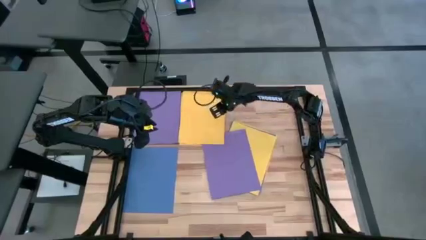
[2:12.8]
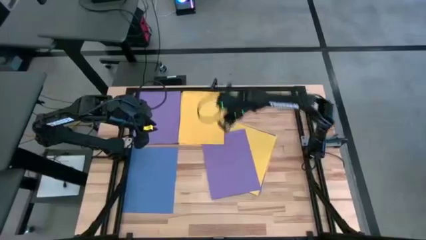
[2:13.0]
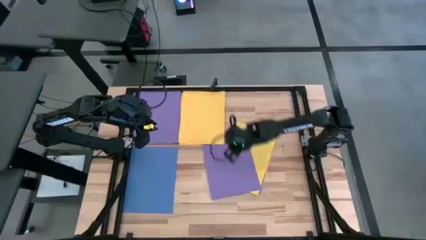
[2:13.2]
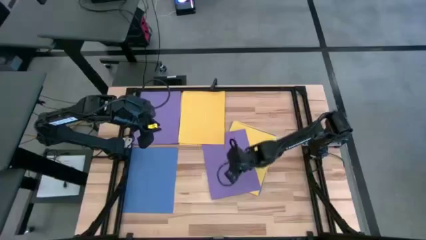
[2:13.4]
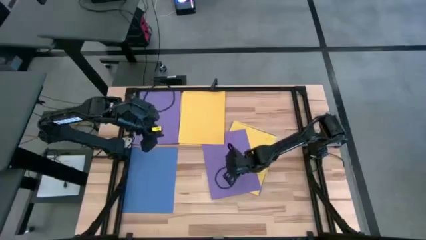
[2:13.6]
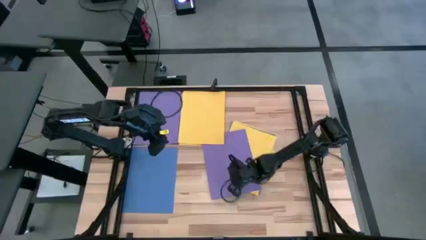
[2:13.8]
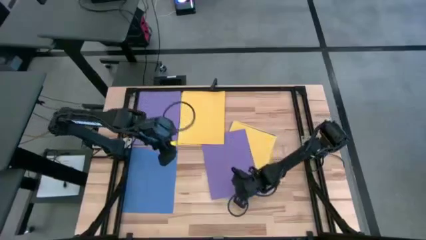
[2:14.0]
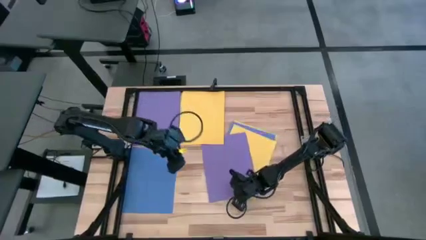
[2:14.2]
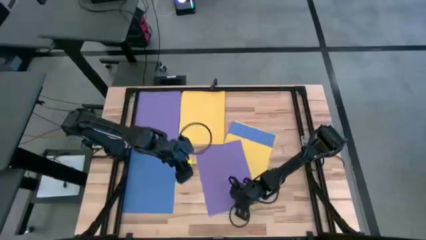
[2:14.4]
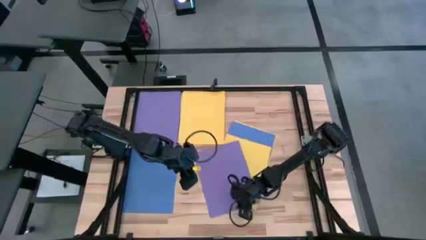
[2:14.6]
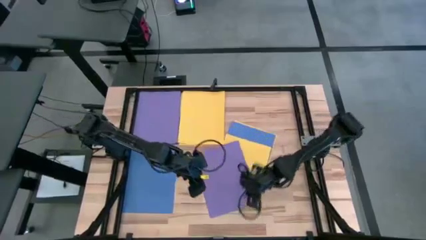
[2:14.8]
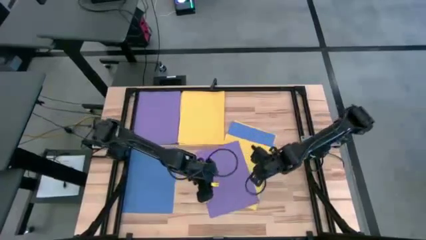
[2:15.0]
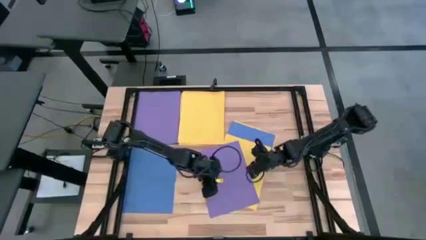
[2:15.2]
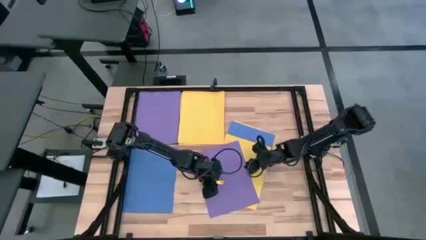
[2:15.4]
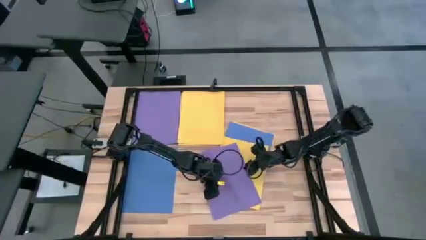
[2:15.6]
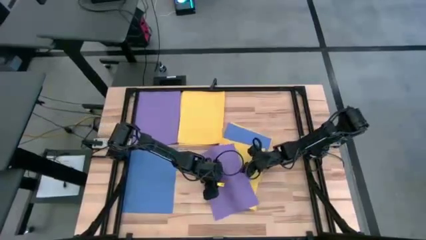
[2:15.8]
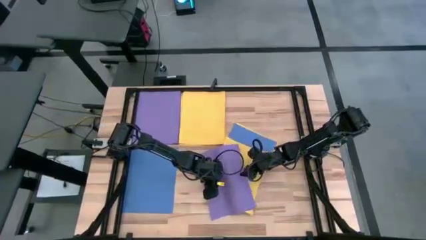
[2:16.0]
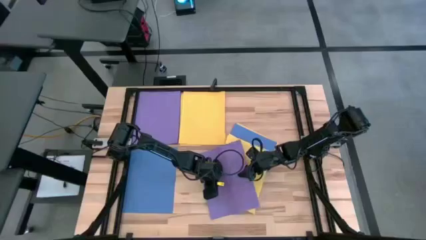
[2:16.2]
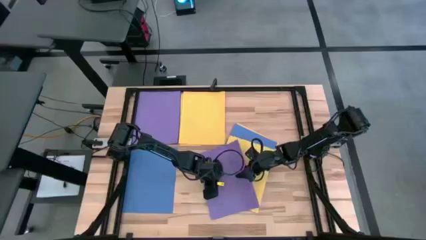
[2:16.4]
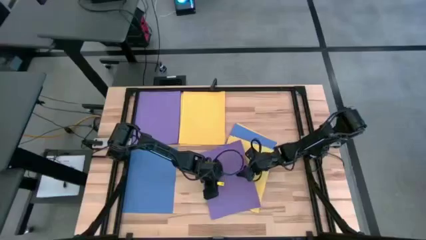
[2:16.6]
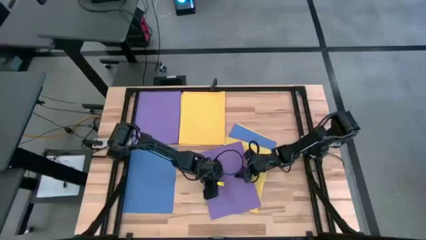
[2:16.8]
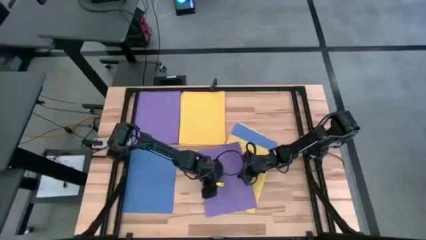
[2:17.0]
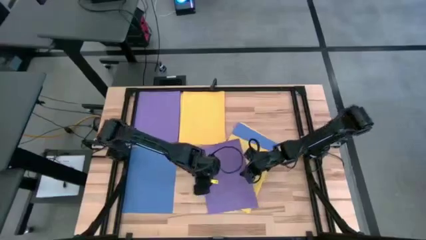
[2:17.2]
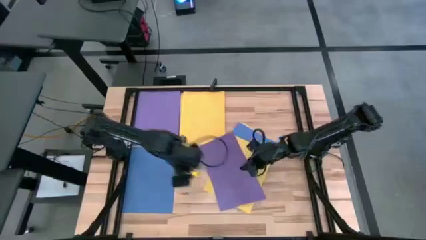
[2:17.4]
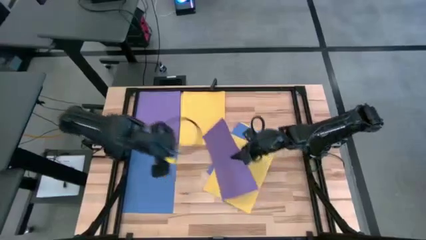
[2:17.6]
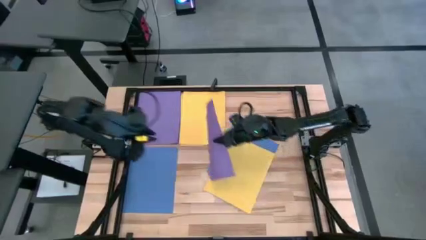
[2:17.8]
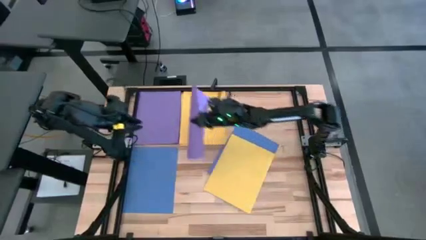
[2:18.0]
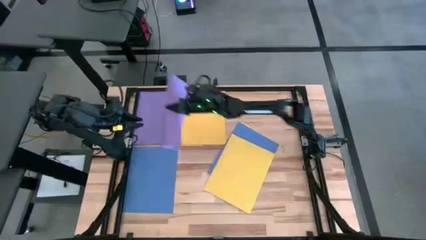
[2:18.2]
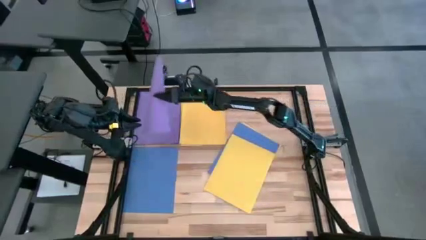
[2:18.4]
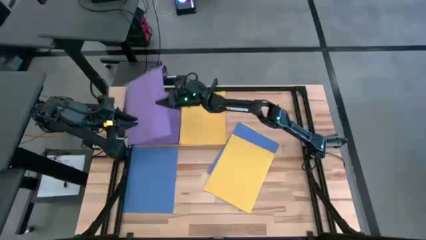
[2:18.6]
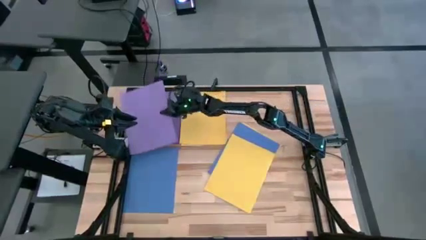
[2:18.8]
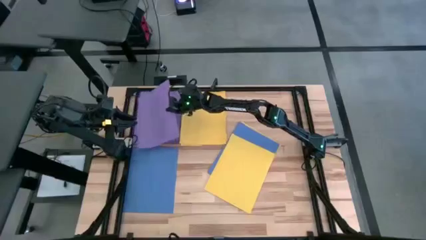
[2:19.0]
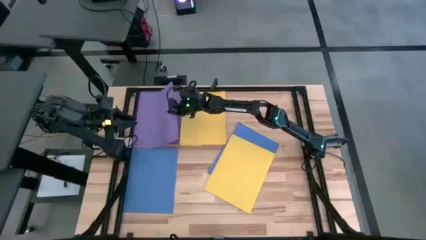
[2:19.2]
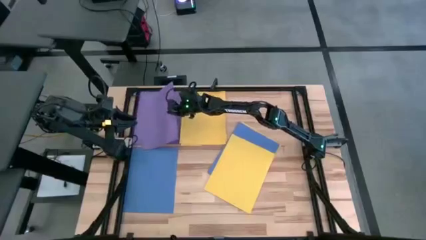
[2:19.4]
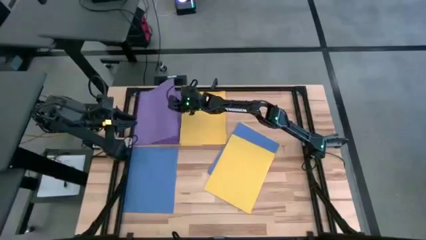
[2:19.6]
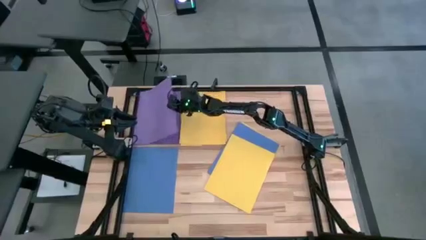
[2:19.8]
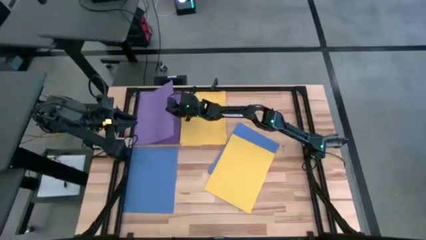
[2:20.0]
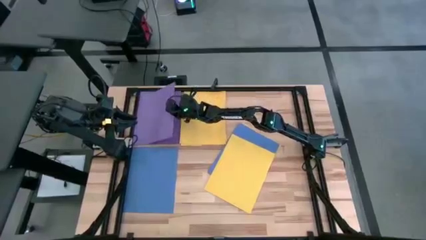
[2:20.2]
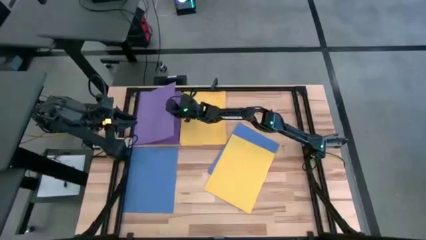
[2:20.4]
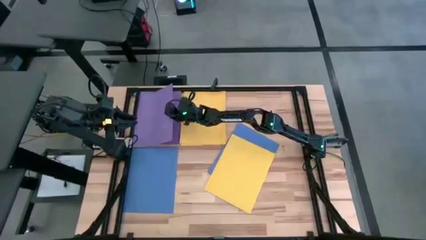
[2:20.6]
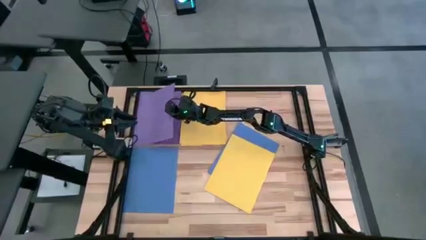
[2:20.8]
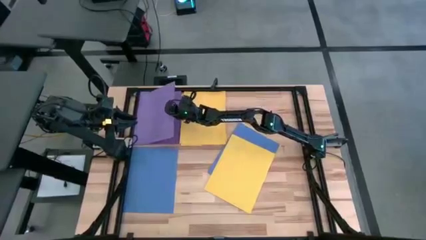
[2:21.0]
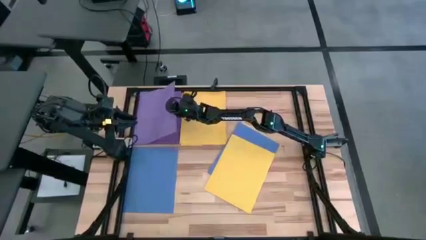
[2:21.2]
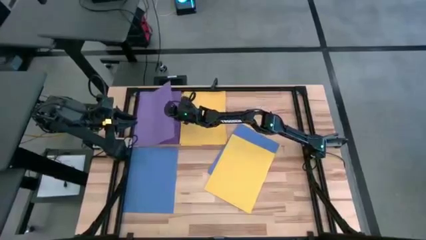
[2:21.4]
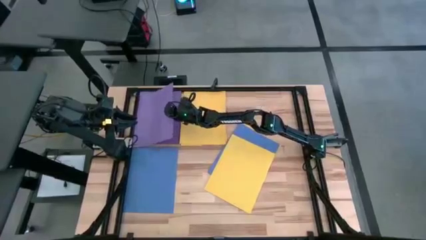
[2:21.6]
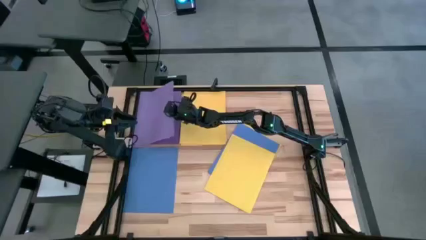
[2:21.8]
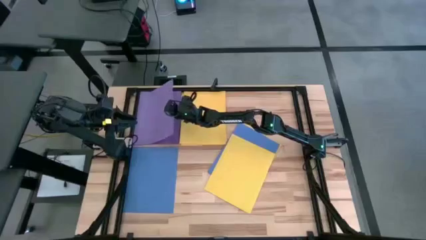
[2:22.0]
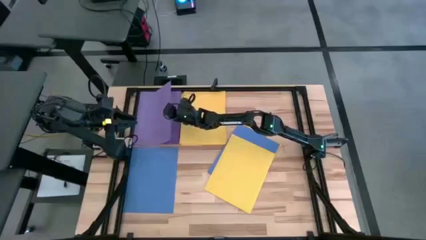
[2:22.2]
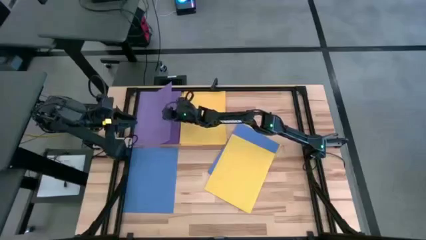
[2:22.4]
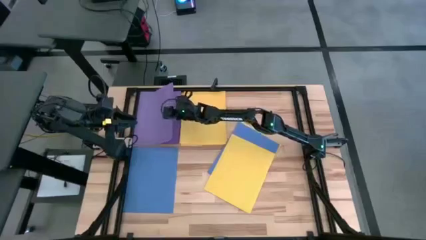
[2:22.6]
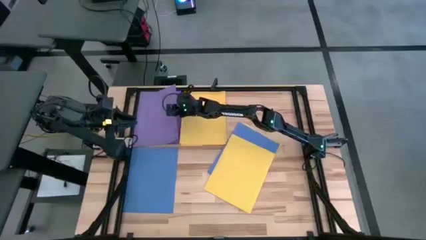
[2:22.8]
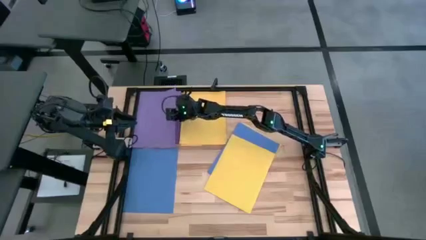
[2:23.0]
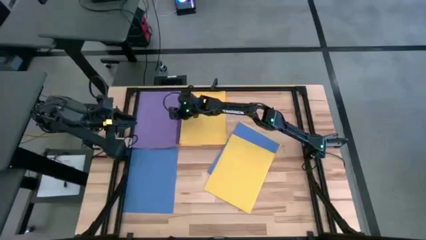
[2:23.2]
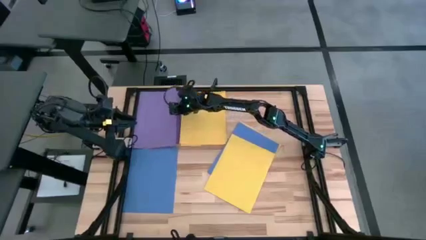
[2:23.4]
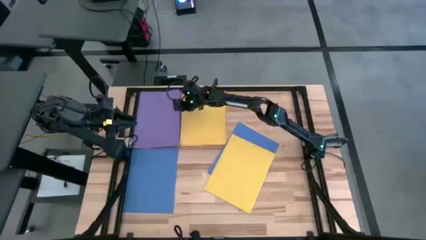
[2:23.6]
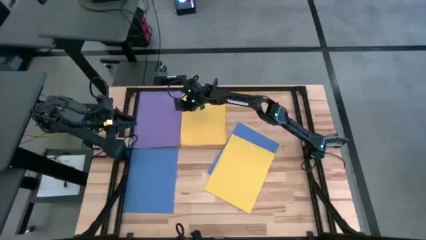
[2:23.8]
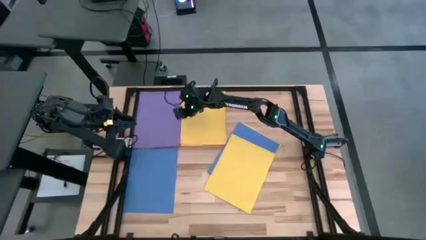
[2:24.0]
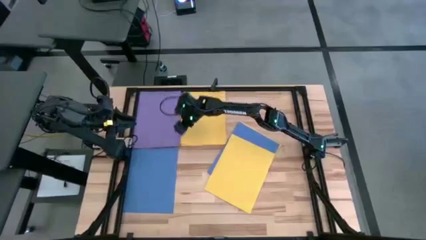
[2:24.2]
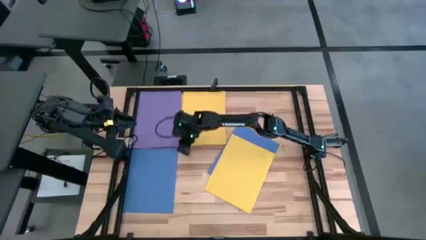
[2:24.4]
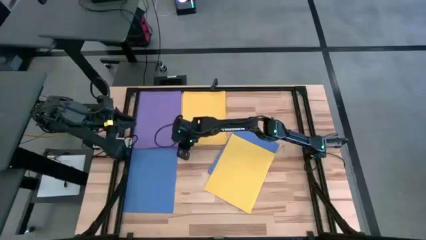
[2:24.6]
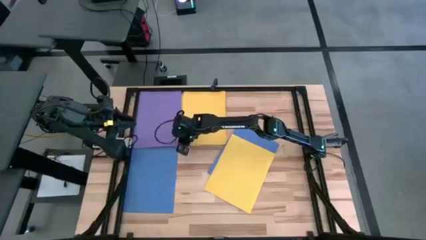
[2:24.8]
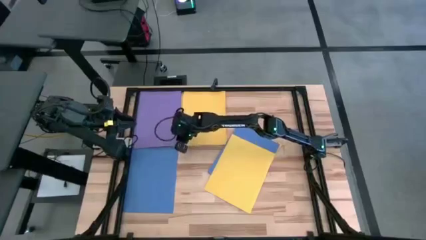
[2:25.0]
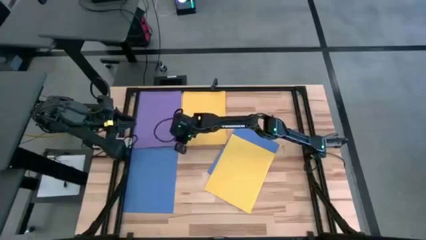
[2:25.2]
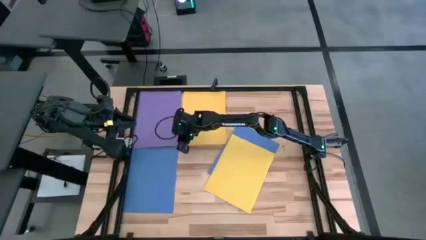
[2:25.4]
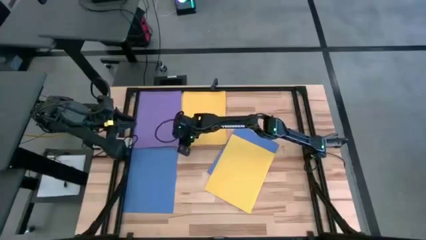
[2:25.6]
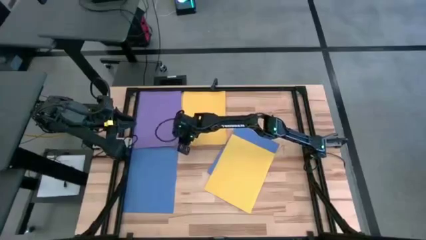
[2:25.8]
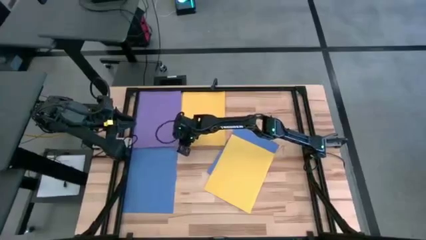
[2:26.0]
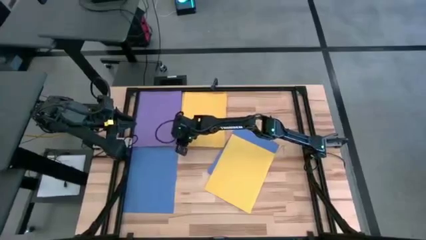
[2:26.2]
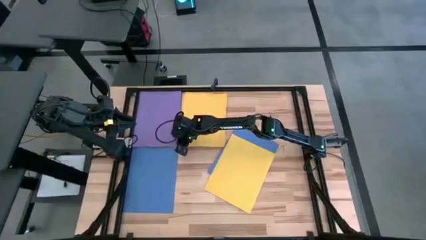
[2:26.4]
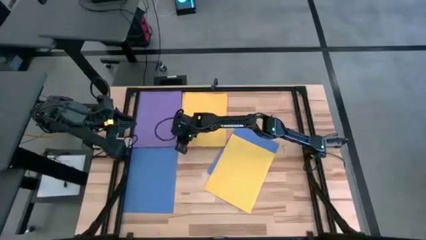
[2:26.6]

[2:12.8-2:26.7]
Task: Organize paper
Stack the purple paper on top of the purple paper

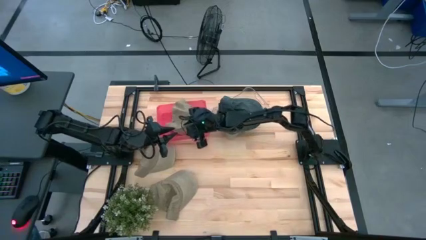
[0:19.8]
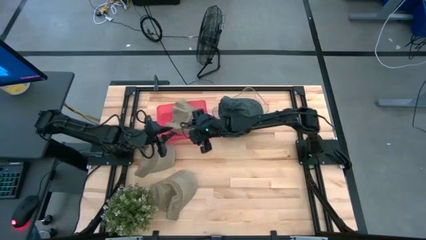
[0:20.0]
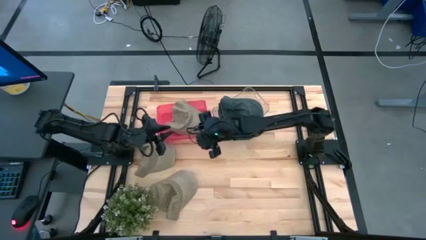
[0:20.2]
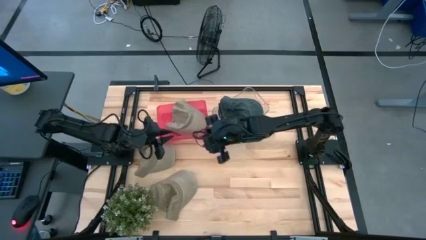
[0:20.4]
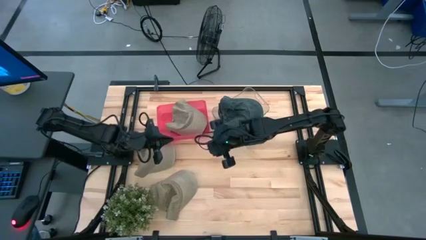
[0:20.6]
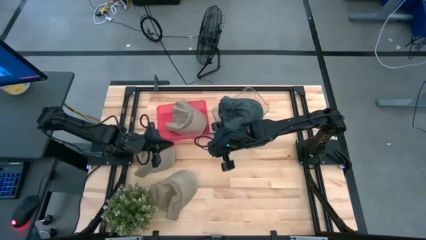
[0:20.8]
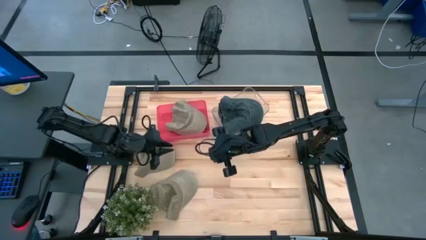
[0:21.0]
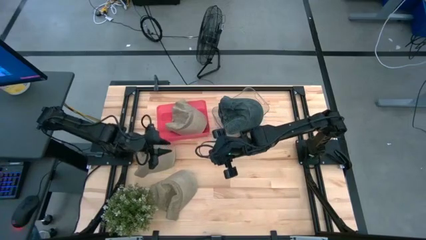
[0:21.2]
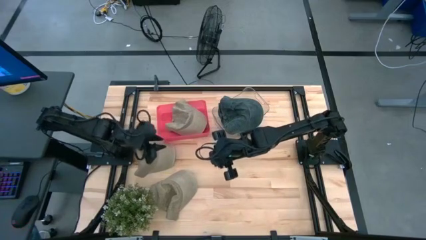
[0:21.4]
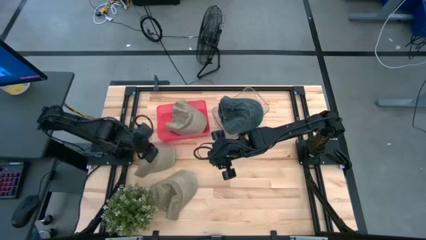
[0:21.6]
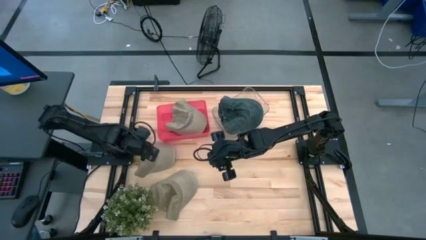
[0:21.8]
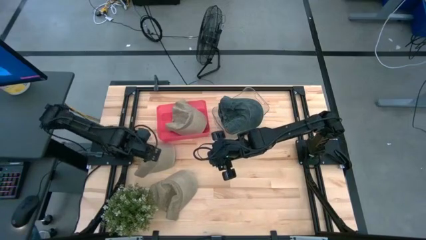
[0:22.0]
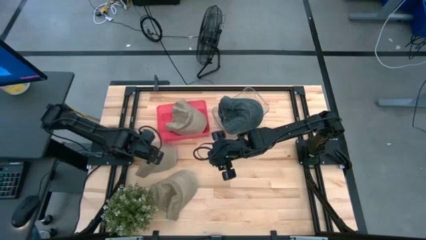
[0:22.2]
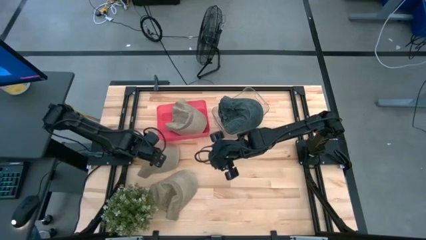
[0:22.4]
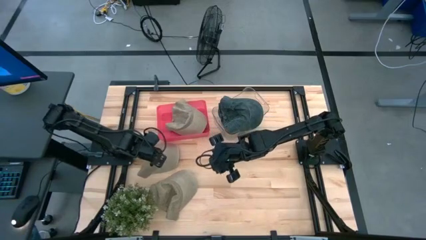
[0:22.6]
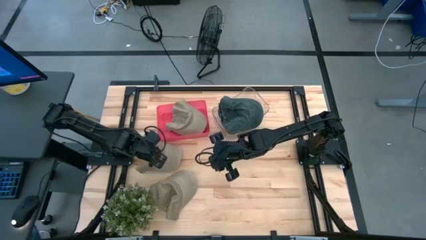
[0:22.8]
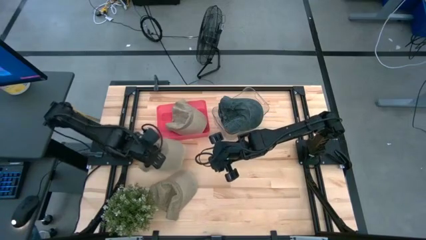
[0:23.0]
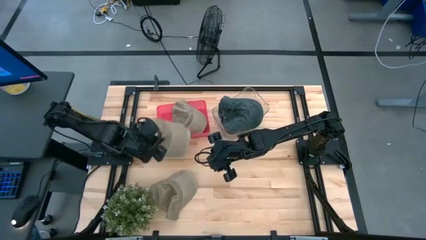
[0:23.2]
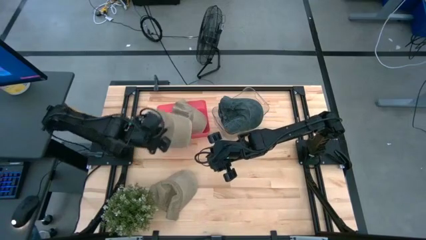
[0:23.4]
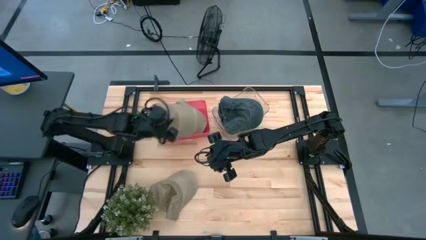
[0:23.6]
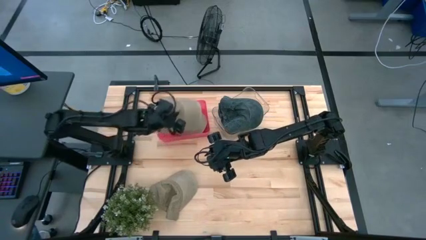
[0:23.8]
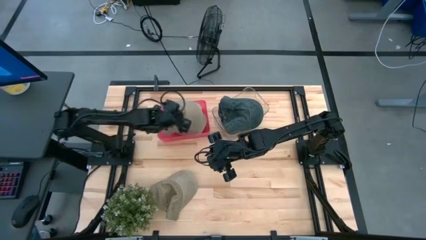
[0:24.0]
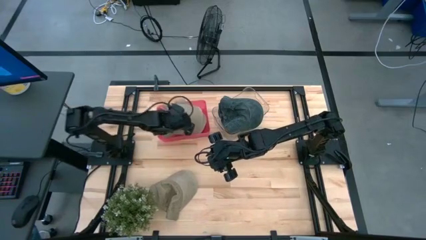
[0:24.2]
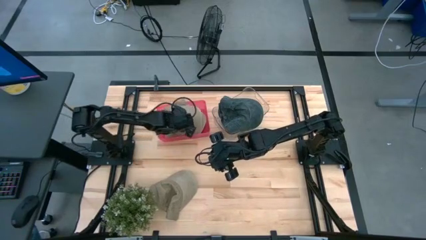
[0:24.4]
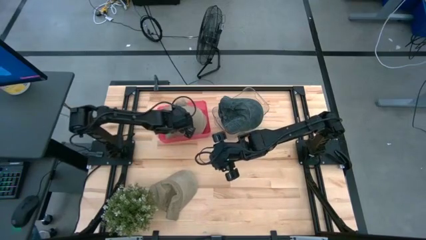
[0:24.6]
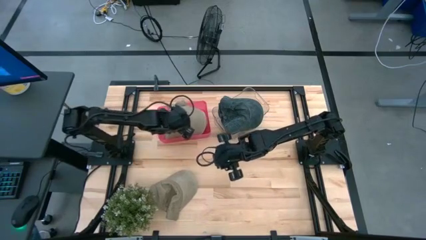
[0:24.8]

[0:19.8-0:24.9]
Task: Pick & Place hat
Put the top right brown cap into the red bin
